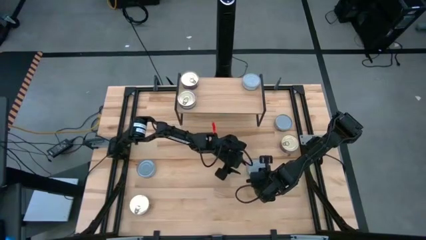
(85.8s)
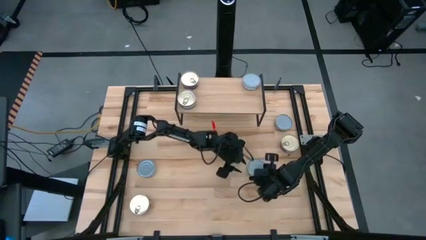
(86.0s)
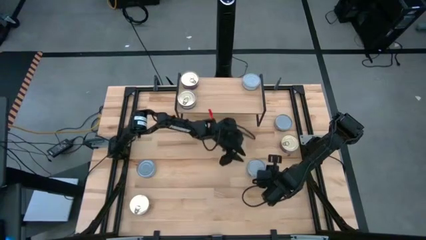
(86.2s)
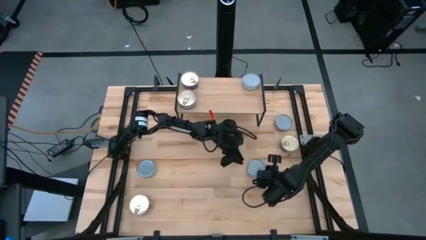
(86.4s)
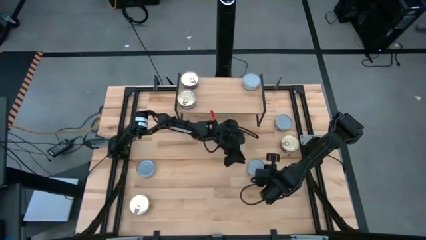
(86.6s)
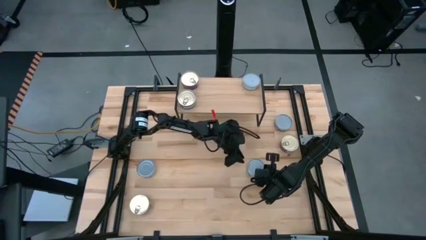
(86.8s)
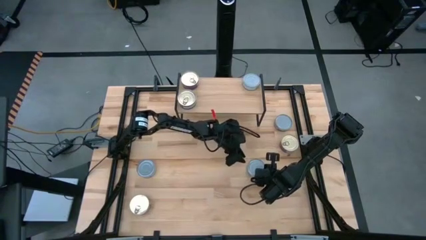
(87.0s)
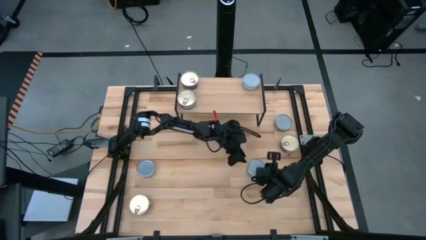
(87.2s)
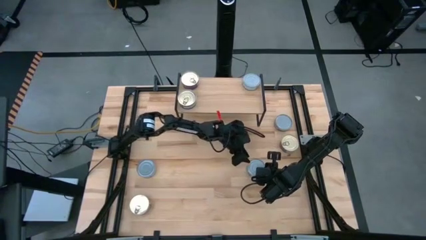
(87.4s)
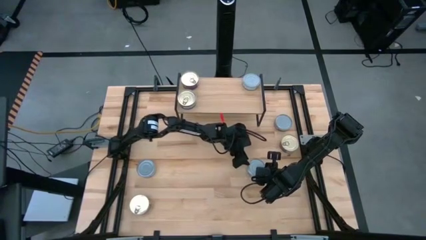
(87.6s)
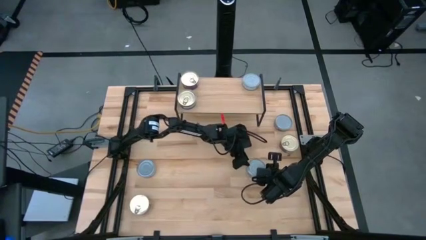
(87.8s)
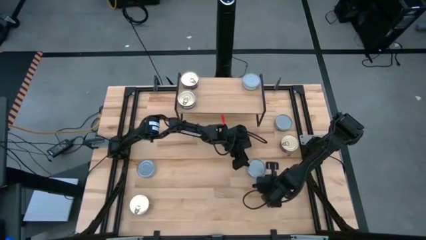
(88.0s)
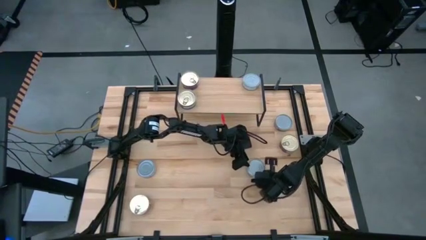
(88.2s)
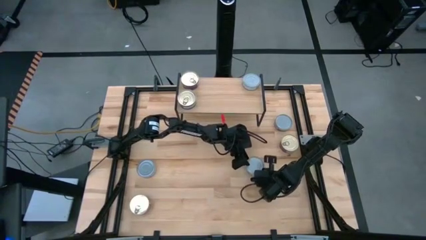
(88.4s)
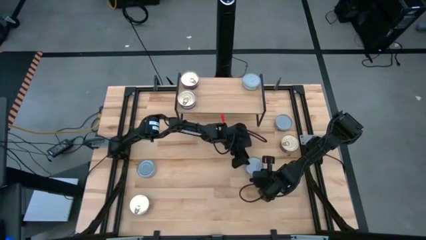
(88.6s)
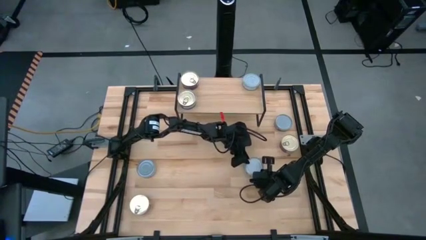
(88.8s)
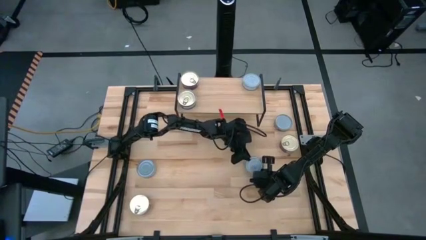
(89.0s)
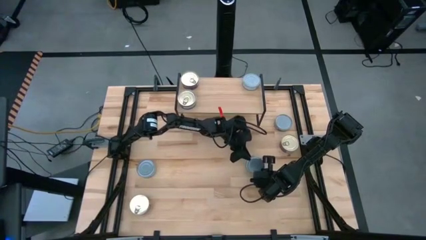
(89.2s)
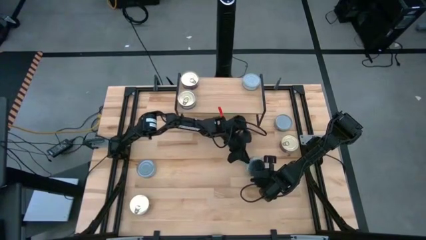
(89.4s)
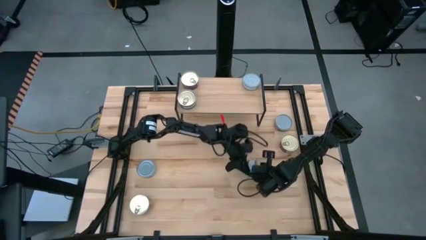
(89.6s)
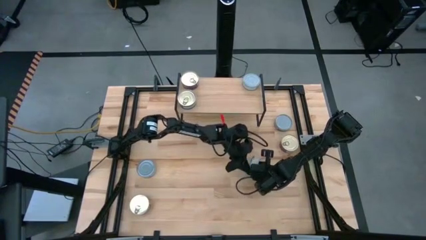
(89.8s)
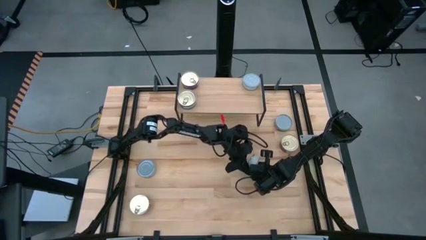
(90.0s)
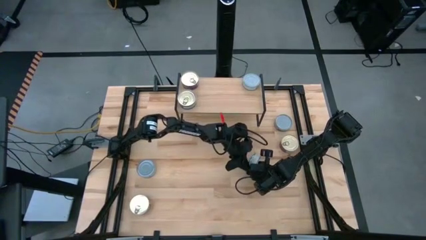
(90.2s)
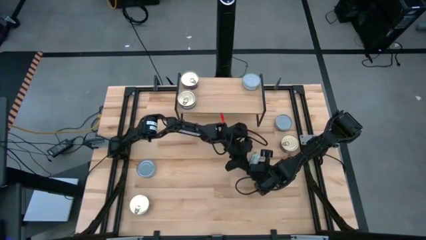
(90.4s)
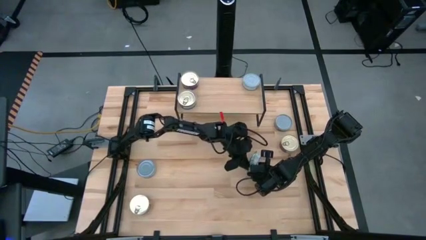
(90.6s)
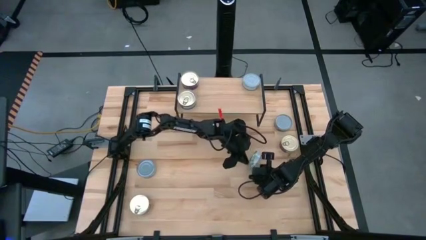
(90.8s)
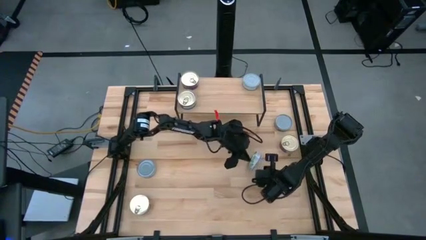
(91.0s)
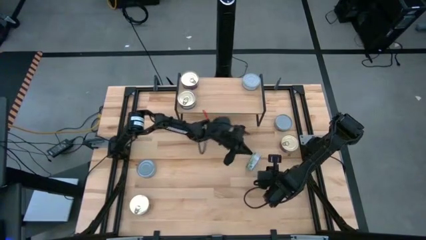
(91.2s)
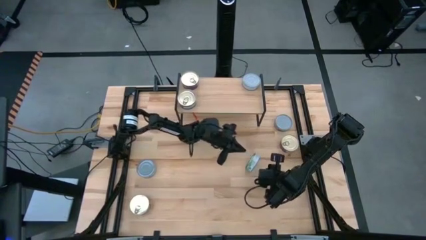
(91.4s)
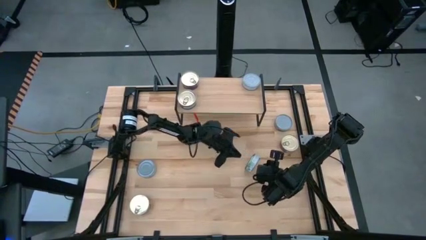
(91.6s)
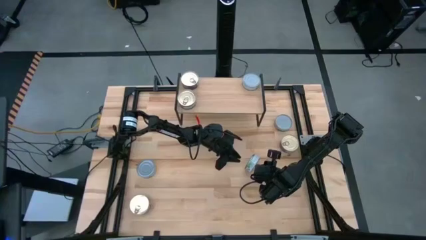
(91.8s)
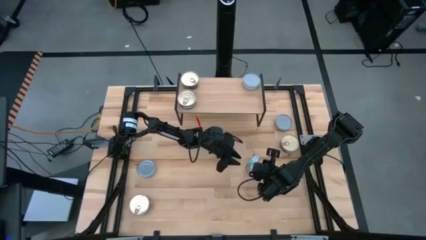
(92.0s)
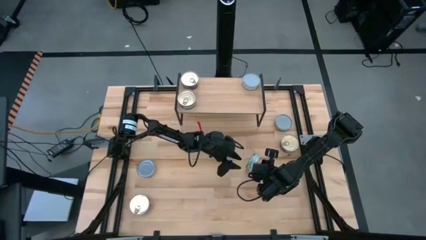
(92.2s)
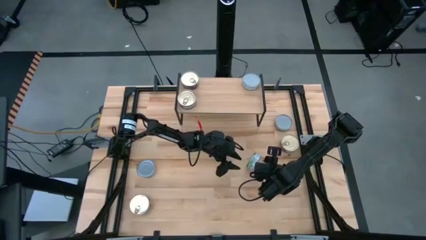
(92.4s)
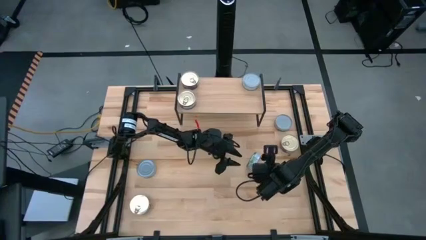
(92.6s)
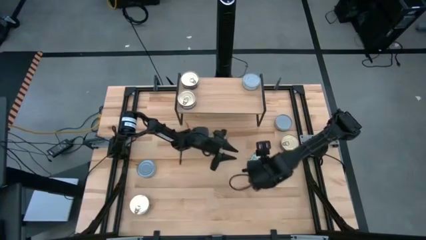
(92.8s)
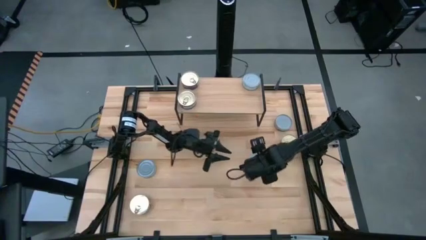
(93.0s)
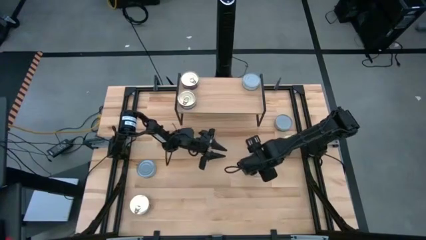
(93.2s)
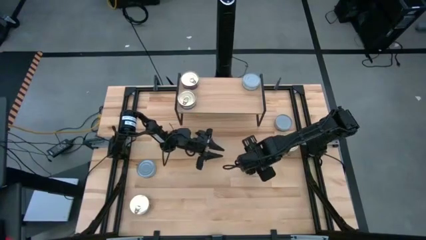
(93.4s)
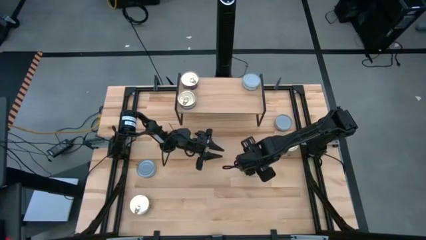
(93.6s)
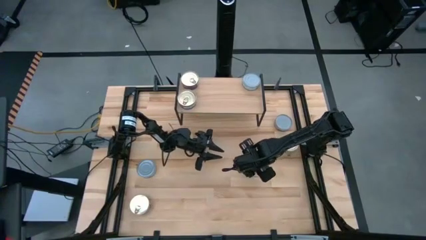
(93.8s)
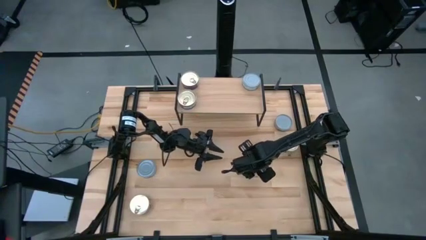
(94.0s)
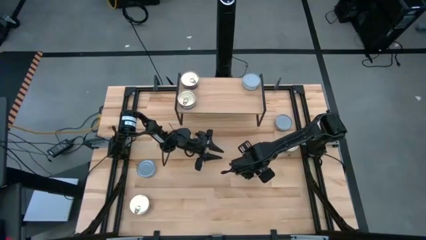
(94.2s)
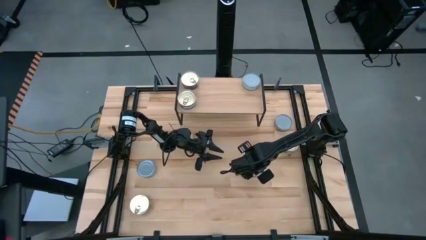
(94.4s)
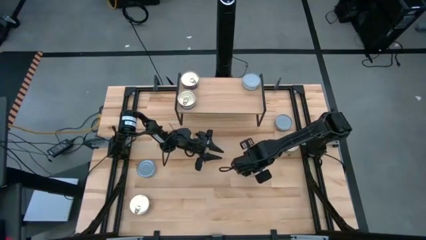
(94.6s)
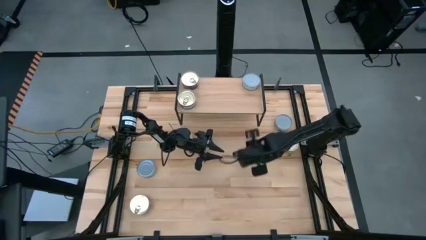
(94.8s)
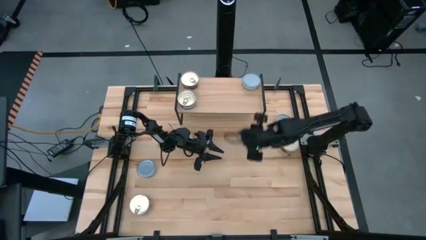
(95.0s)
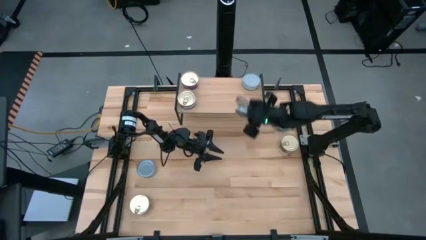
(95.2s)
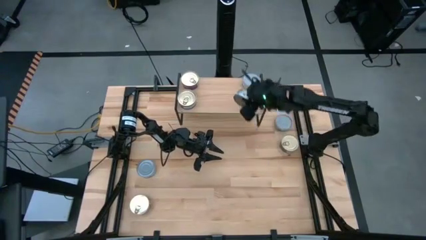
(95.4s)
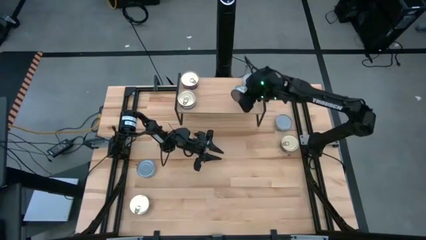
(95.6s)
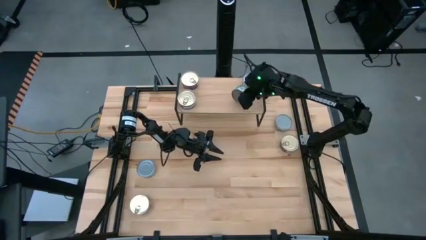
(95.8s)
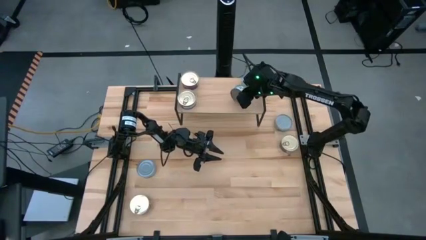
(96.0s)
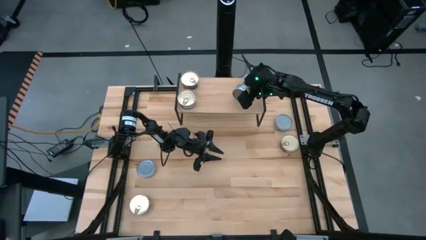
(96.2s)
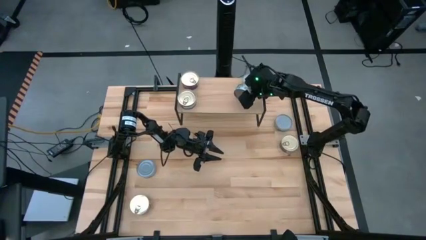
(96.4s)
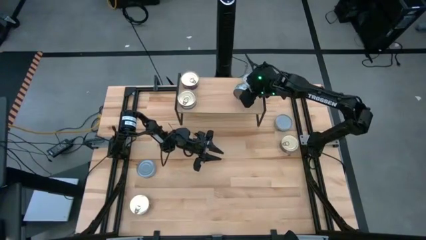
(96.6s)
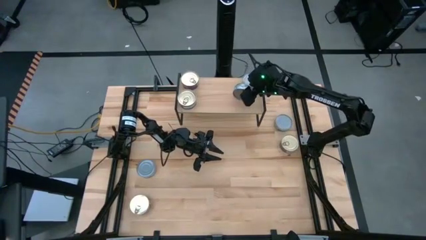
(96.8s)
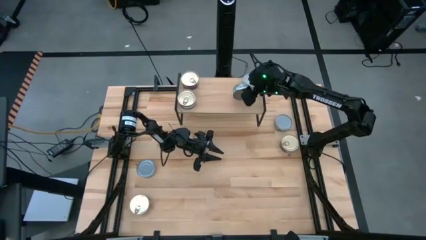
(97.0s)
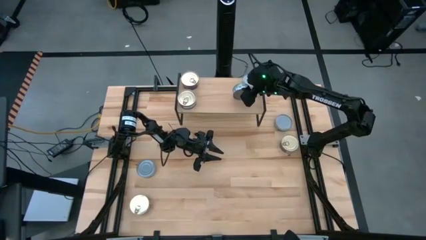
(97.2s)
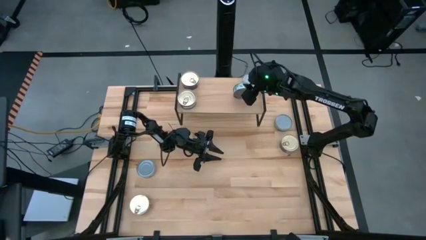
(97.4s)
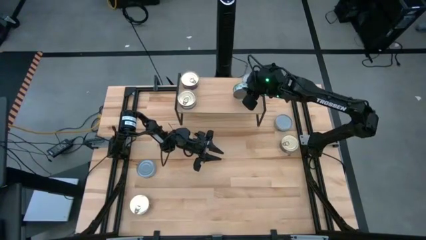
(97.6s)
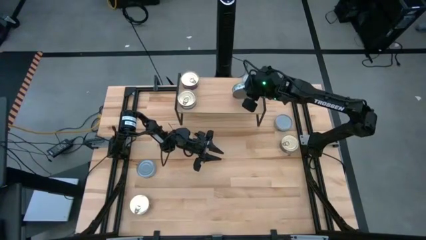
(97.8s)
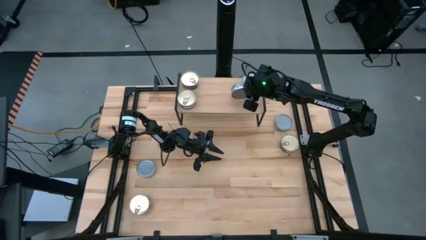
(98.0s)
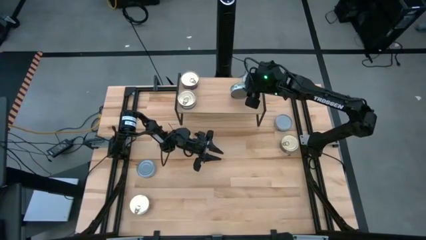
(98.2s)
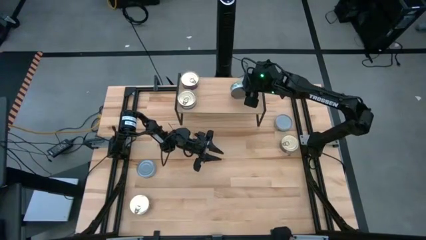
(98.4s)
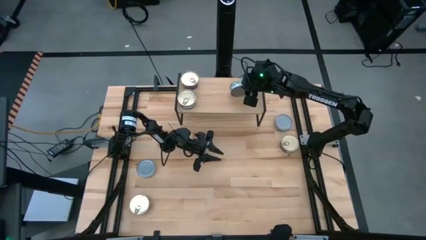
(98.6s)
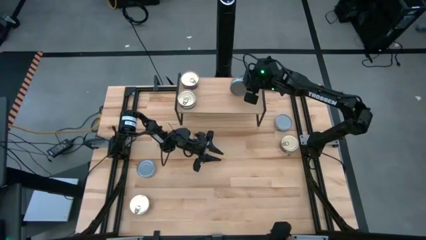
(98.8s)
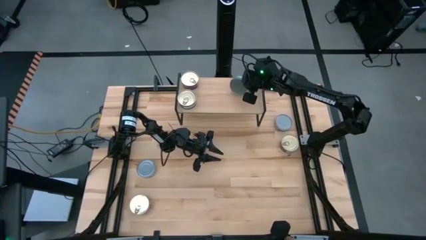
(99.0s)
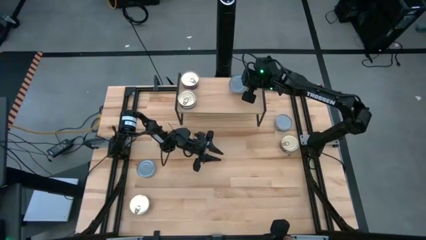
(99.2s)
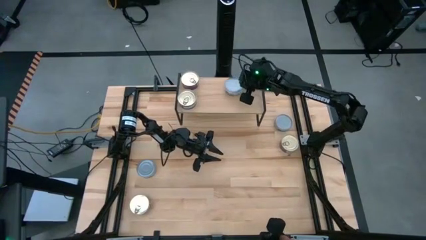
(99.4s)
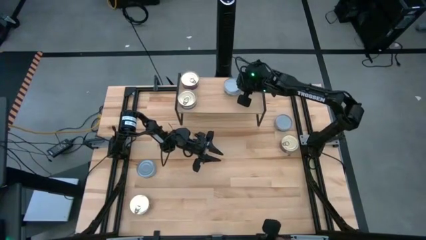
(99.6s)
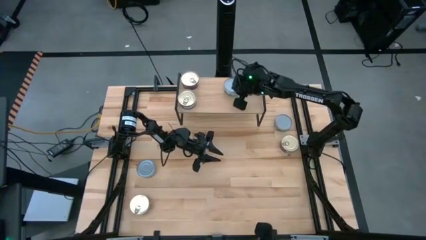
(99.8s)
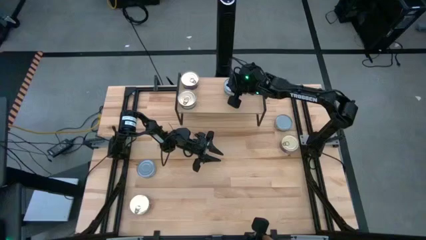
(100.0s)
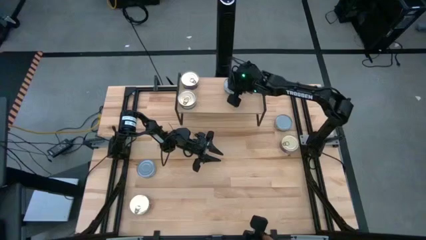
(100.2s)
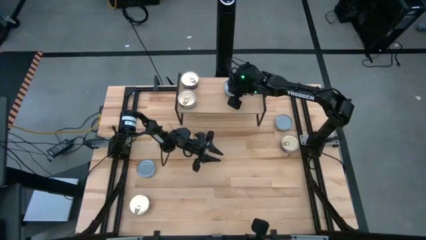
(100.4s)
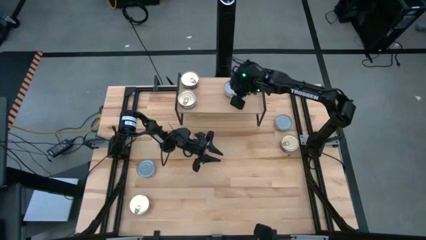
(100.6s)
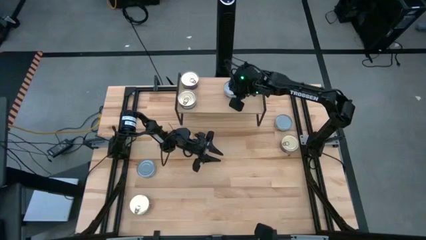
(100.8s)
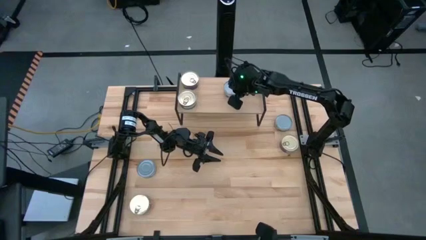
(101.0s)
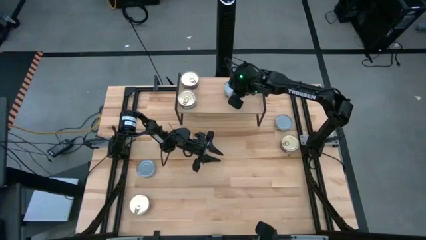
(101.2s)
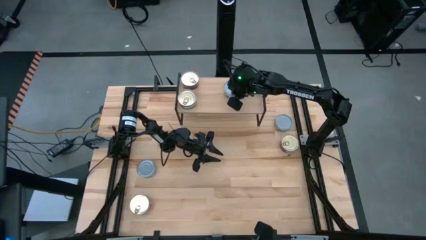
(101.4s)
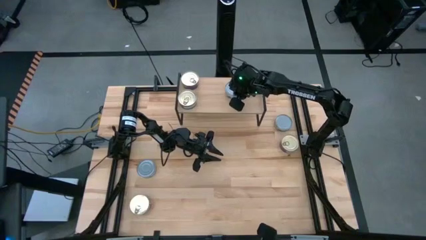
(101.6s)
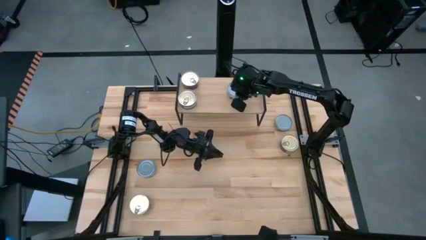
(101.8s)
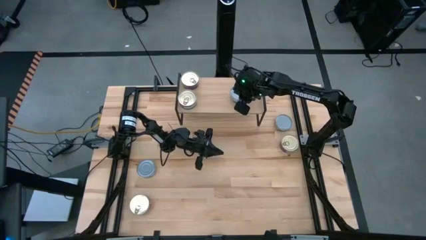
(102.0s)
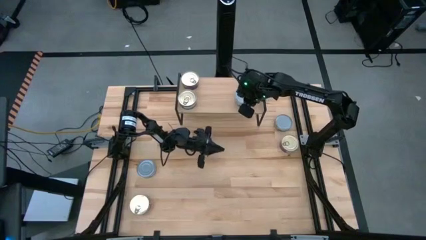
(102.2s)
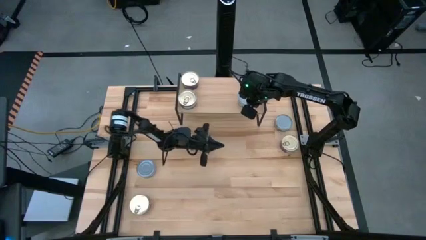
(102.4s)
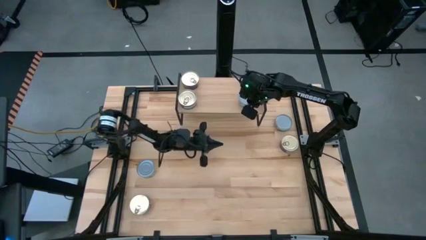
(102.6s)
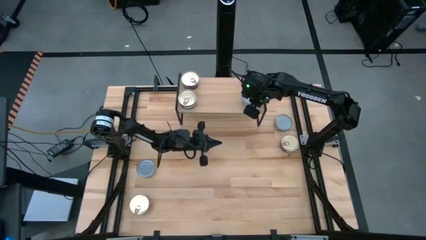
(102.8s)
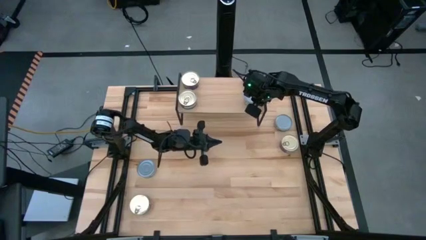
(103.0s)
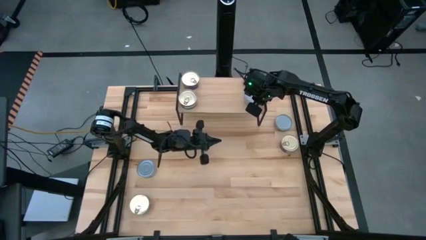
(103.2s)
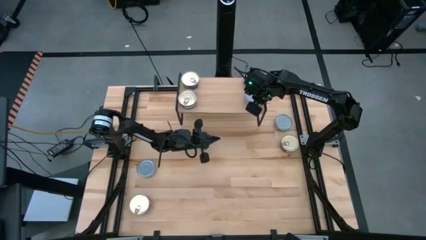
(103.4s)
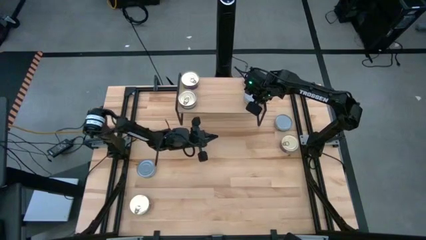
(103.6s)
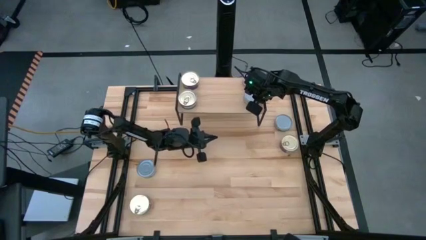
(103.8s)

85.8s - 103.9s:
Task: Stack canned seafood by type on shelf
Put the bottom right green tuna can on the shelf aligned with the other green tuna can
